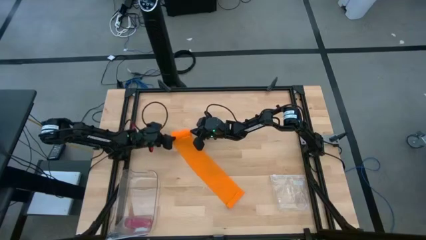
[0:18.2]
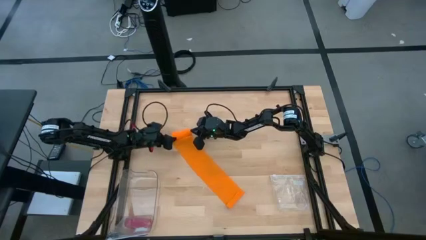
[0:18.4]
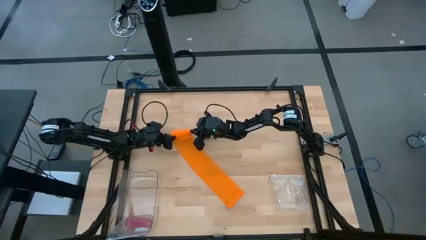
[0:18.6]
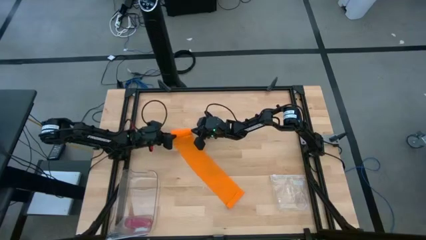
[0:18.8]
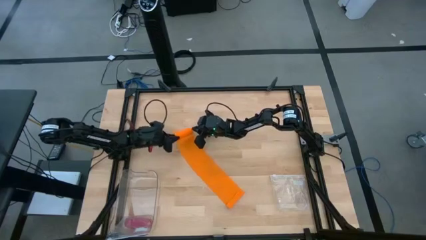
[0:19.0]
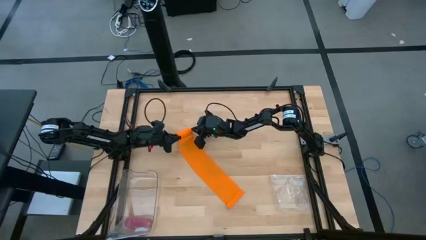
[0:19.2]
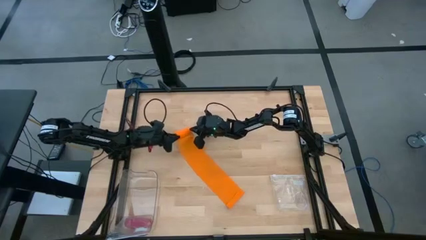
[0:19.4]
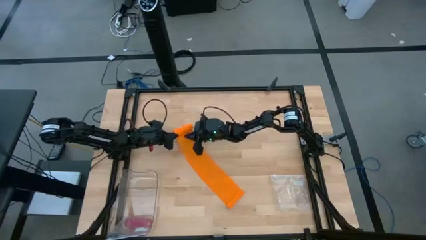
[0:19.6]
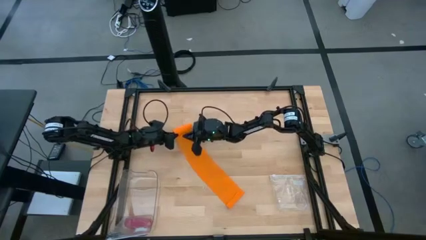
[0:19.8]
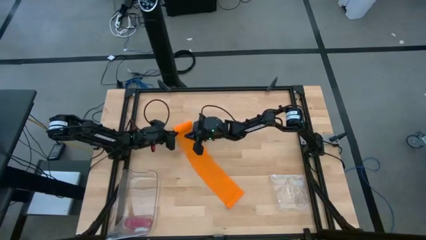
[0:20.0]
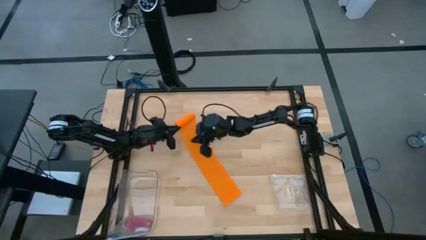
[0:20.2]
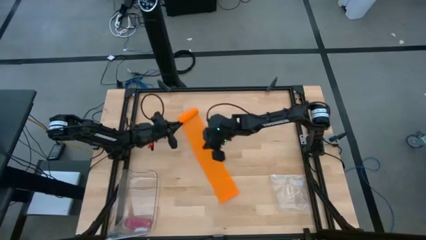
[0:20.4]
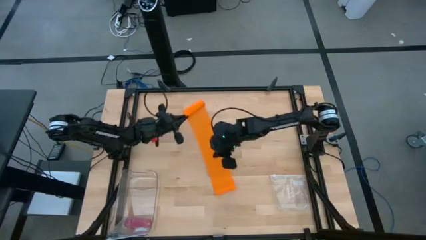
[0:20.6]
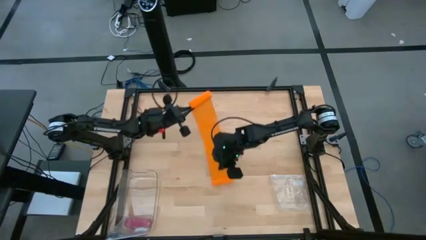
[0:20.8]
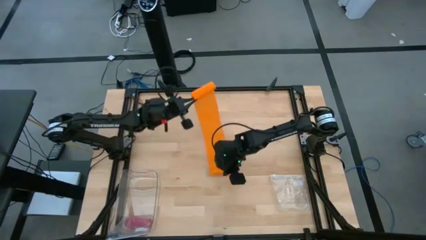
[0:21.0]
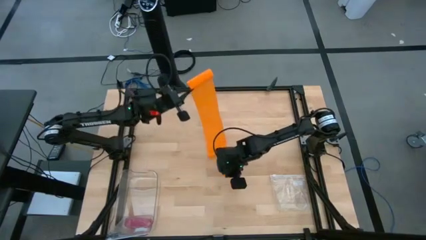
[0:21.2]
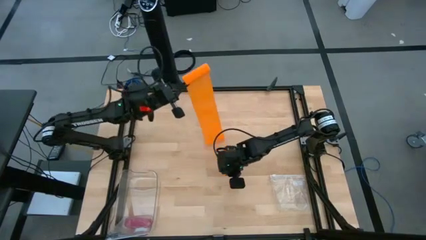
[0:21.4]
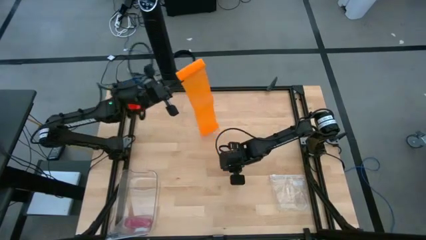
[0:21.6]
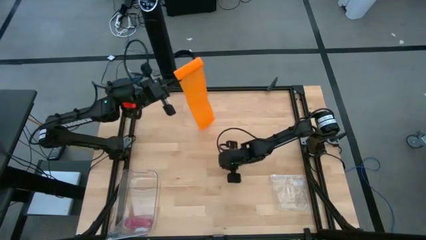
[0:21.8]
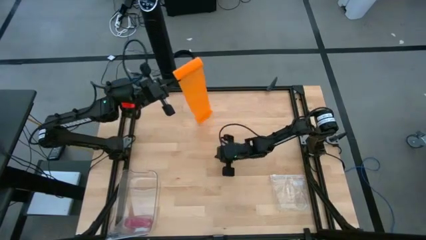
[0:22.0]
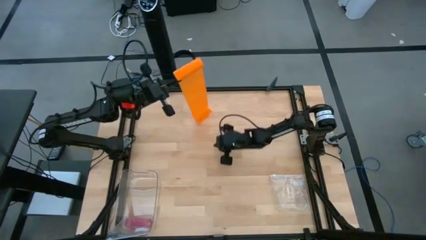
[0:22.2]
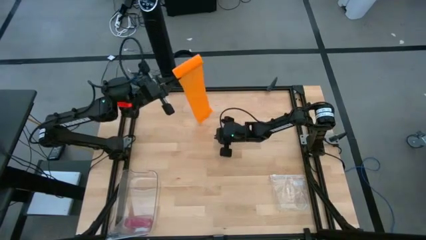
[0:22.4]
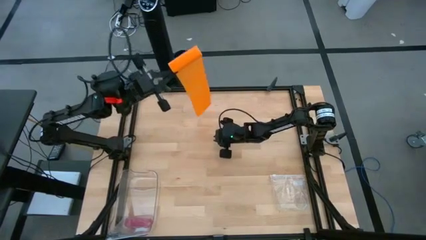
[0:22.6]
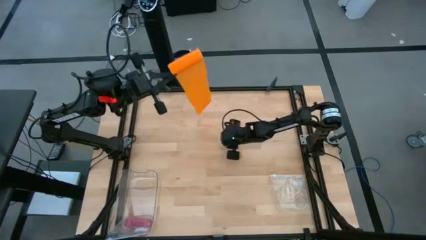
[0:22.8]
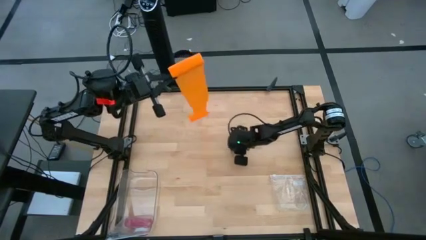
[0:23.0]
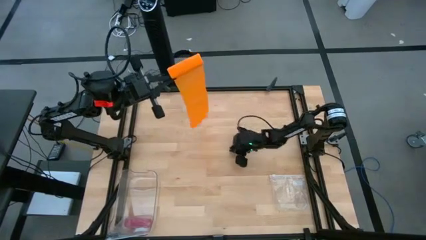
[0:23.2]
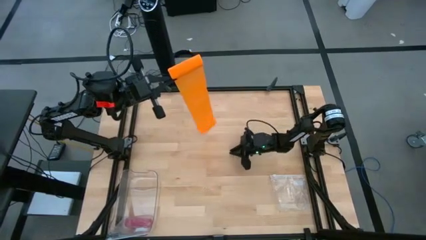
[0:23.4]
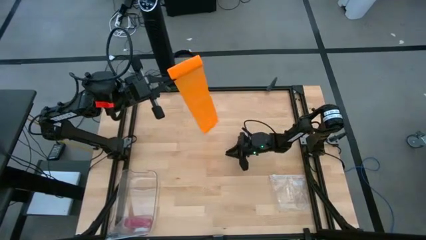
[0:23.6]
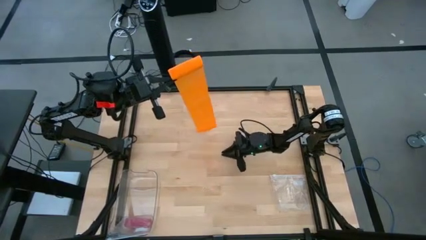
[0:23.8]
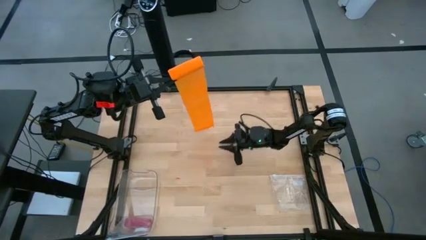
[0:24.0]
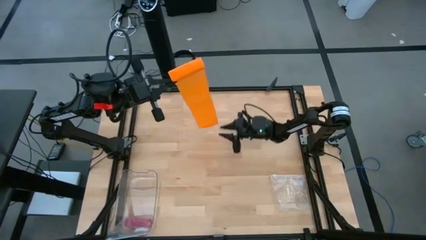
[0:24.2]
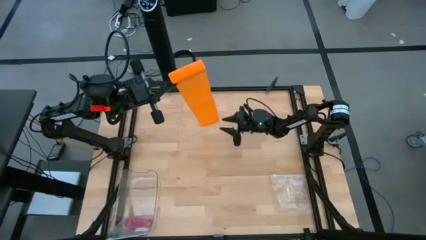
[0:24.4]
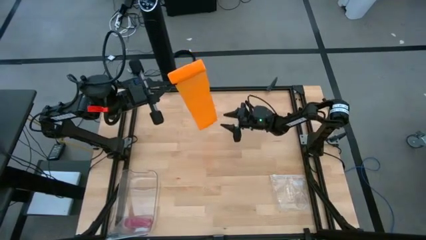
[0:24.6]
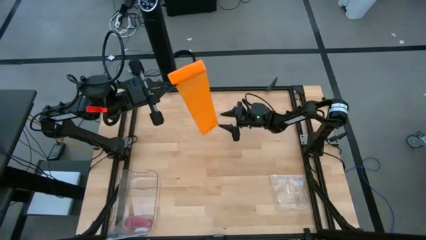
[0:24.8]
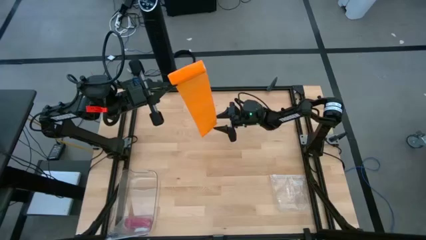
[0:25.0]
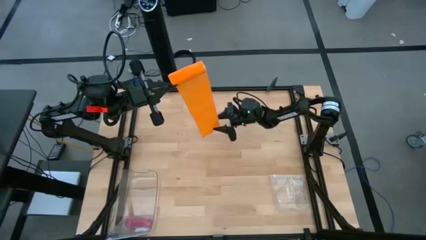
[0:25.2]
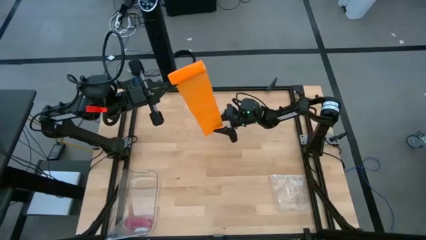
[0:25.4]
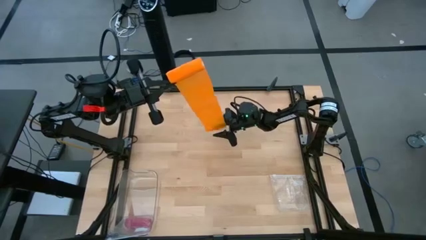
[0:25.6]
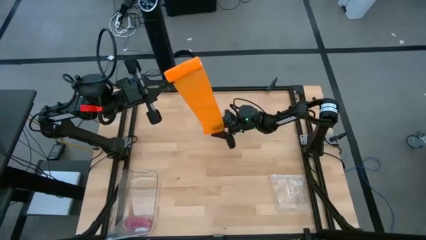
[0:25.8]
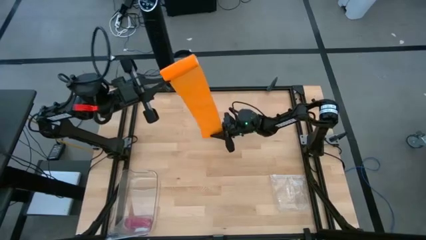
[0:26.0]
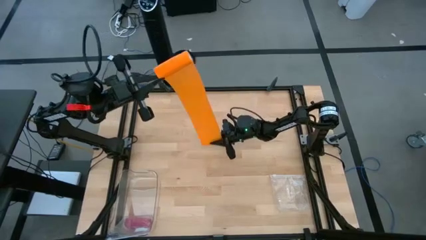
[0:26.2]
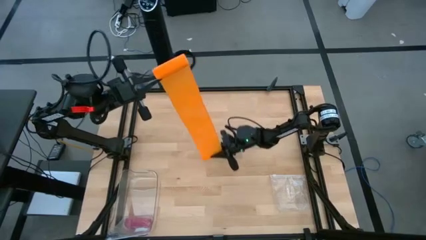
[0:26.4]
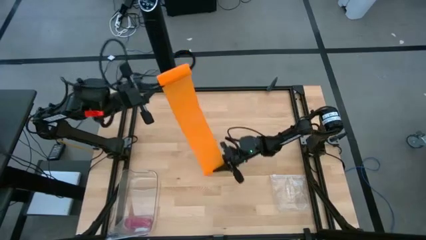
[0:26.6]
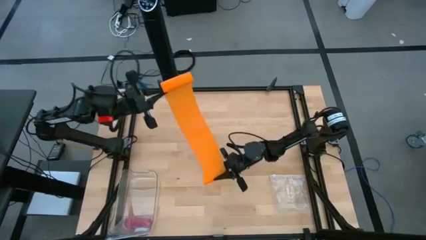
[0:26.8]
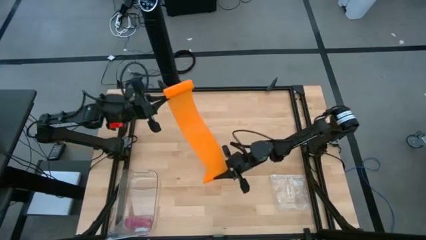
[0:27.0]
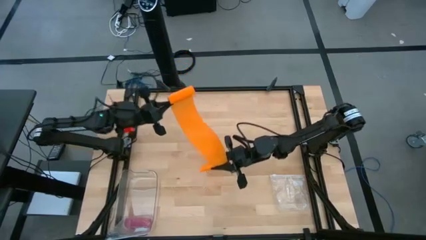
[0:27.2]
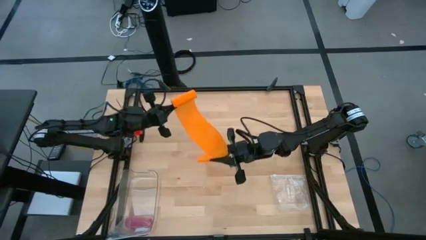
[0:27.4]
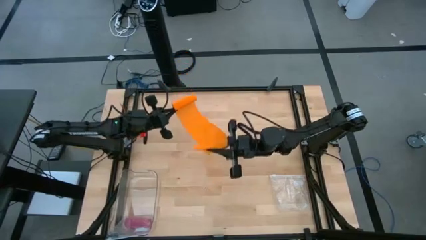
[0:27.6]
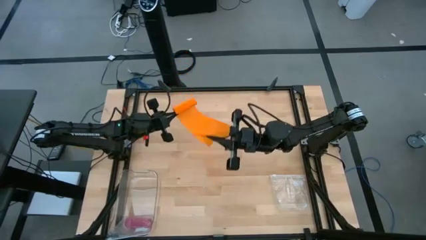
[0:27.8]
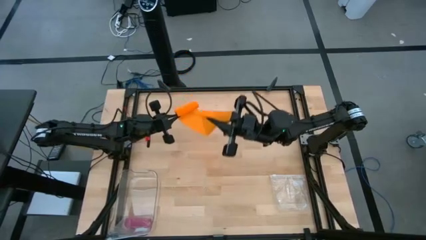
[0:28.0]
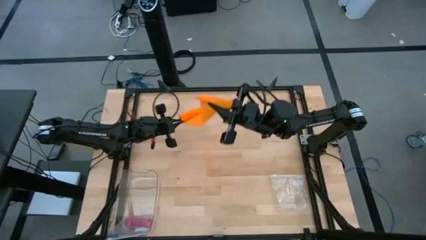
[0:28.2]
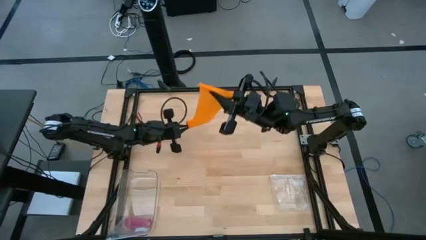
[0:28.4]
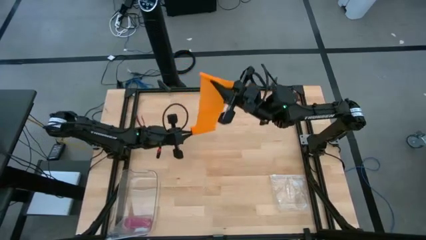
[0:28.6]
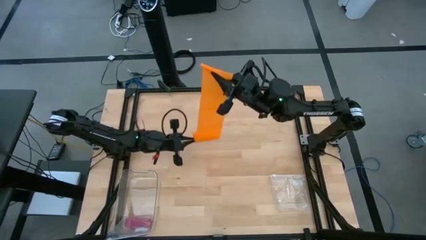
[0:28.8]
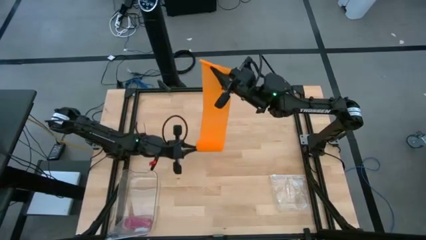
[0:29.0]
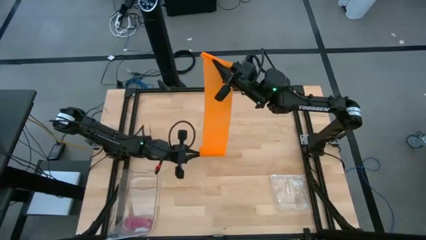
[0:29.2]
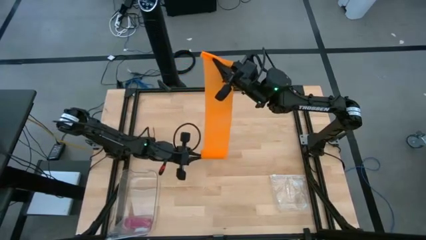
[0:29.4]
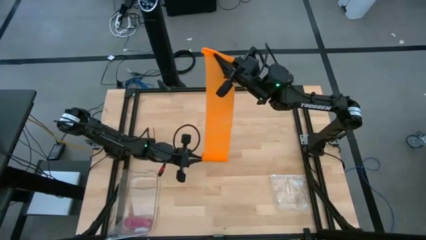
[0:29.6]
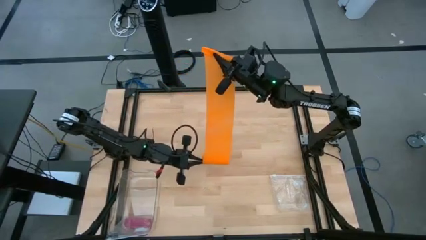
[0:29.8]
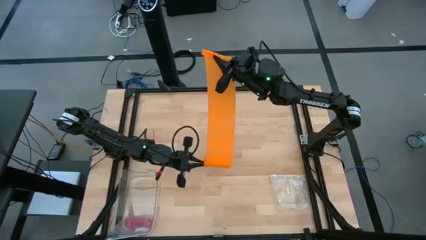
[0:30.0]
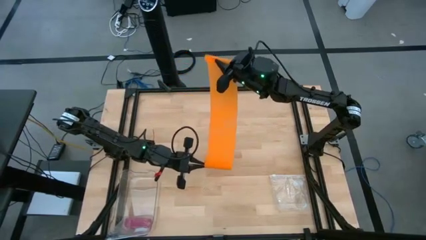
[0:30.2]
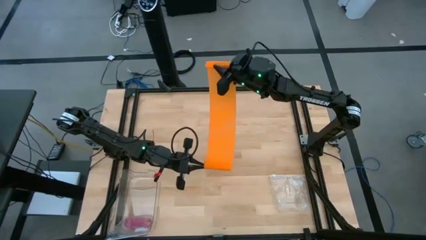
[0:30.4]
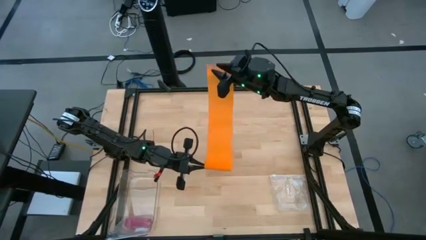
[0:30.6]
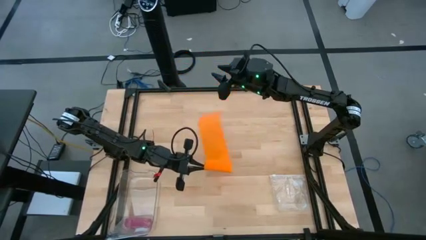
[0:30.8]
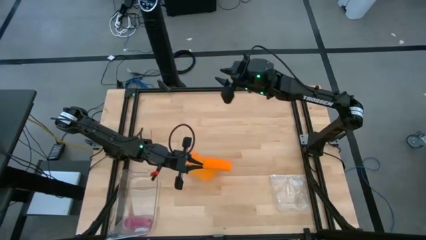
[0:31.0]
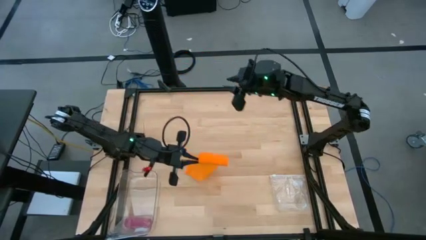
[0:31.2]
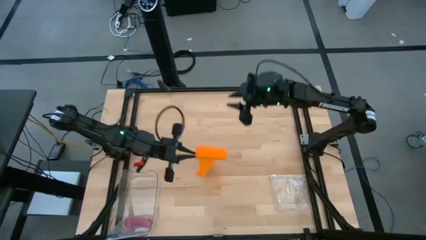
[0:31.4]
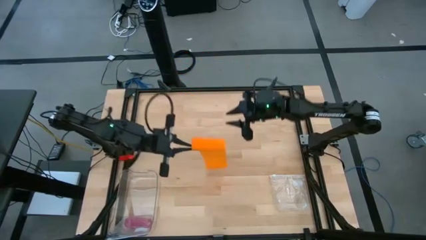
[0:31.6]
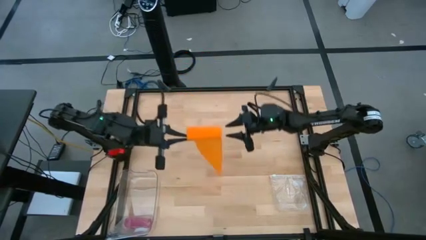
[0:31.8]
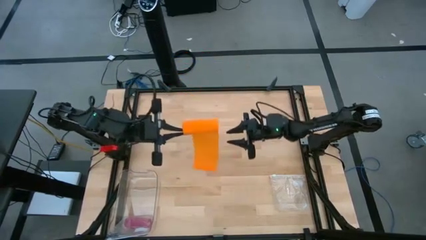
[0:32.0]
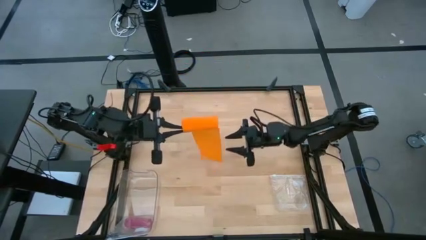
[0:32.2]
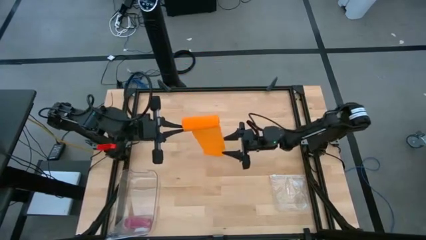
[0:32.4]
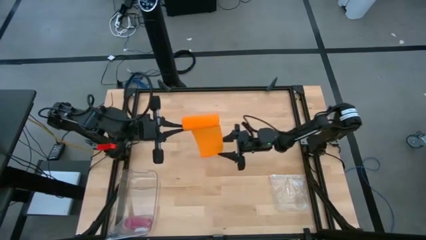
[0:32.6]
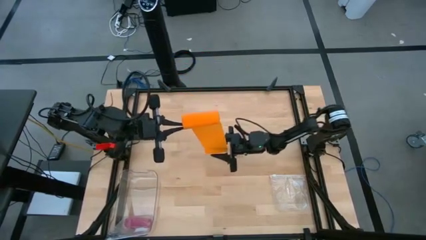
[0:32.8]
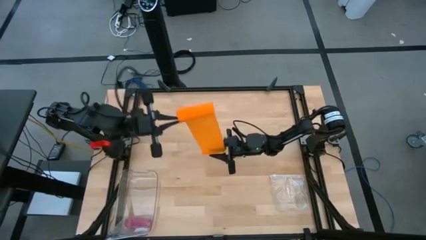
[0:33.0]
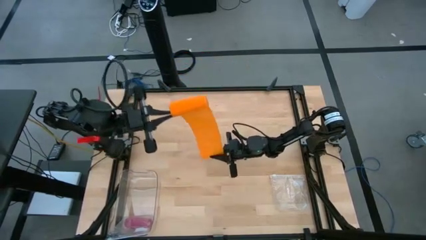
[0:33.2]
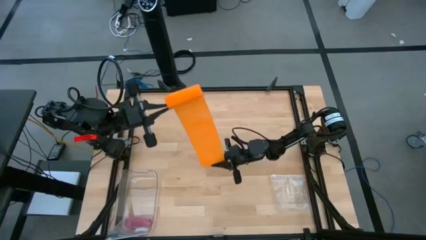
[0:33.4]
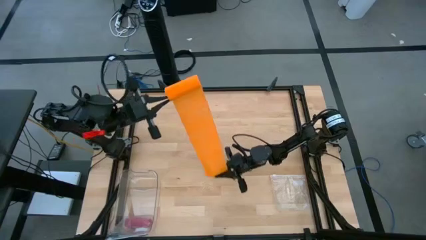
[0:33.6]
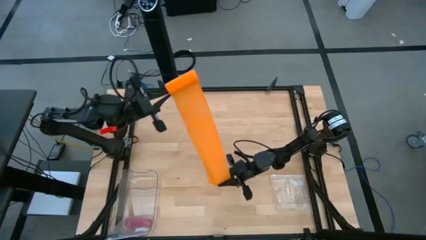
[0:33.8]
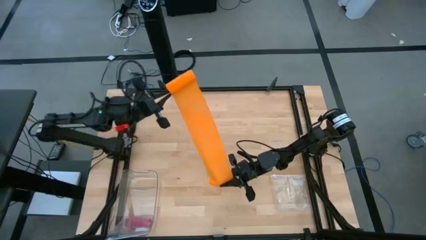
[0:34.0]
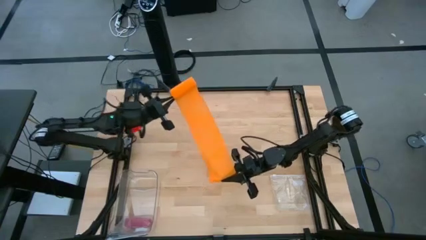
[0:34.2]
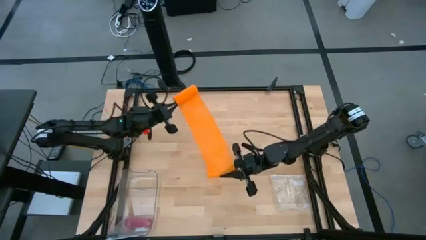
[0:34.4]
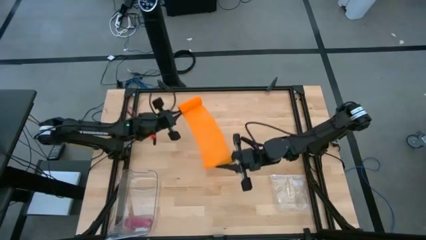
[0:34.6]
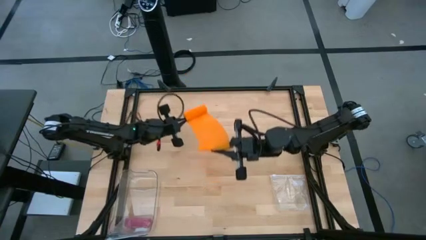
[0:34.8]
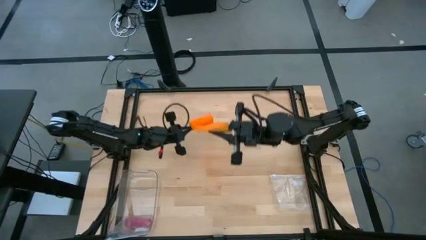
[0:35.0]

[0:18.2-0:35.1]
Task: Roll bandage
Roll the orange bandage
